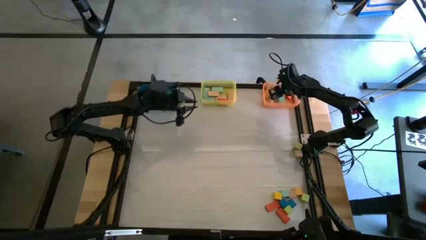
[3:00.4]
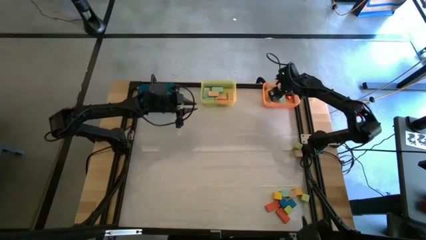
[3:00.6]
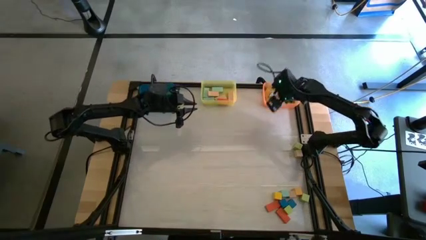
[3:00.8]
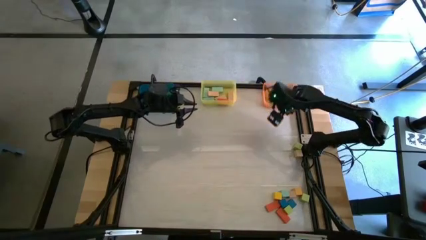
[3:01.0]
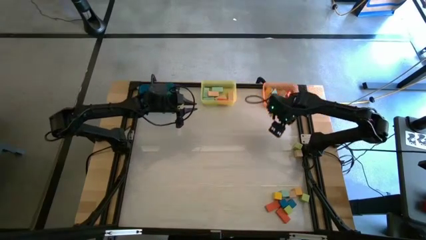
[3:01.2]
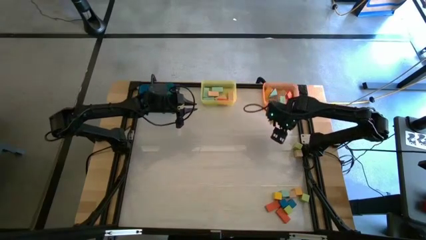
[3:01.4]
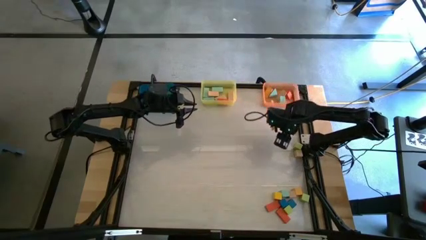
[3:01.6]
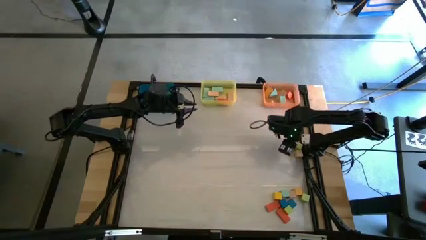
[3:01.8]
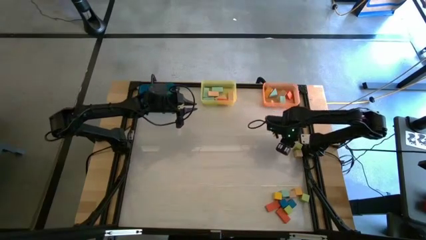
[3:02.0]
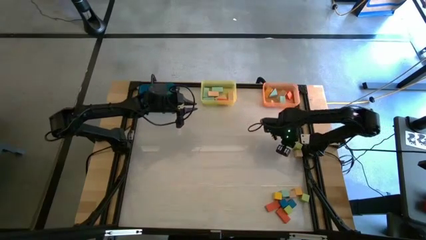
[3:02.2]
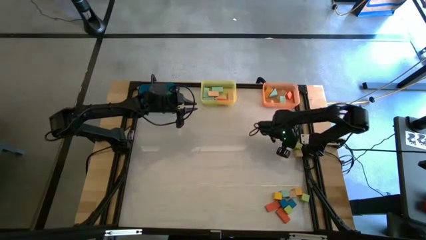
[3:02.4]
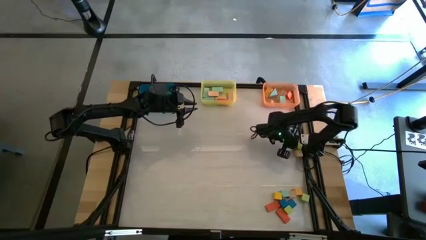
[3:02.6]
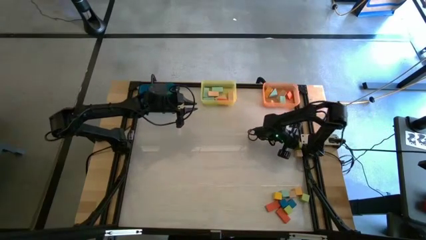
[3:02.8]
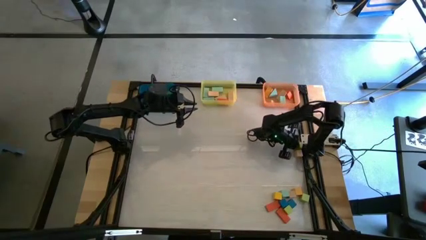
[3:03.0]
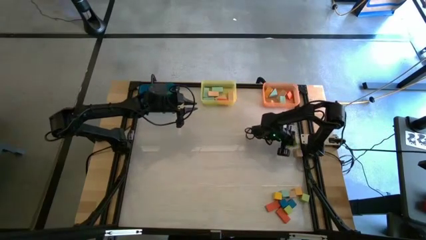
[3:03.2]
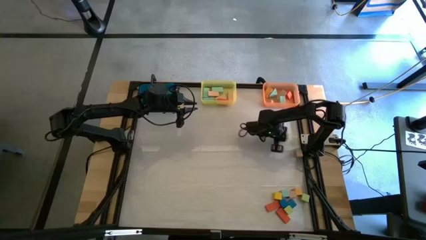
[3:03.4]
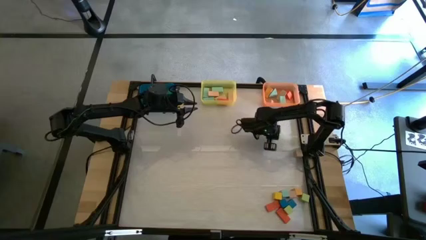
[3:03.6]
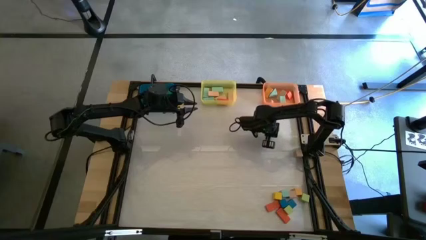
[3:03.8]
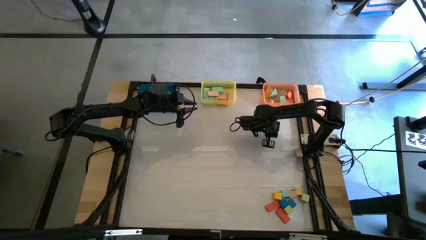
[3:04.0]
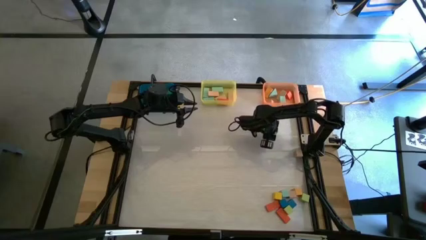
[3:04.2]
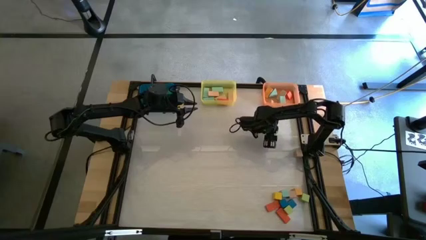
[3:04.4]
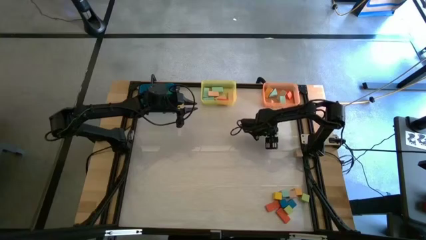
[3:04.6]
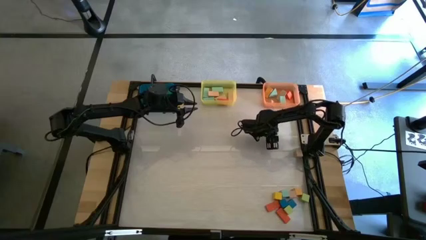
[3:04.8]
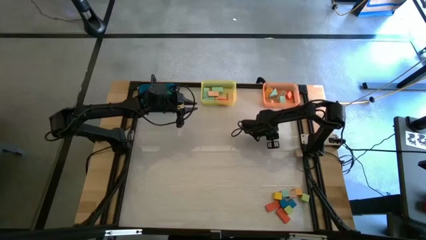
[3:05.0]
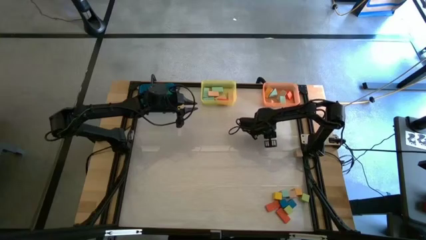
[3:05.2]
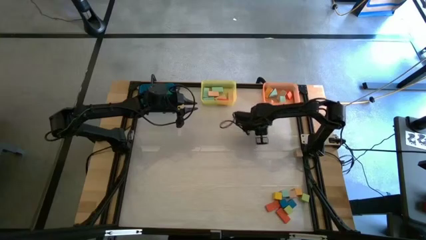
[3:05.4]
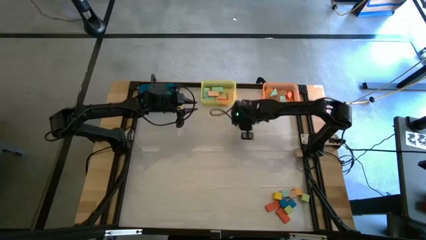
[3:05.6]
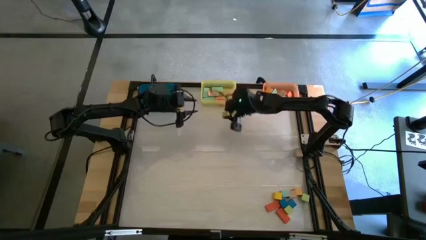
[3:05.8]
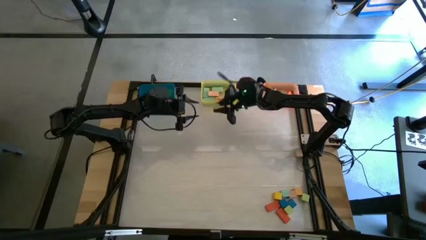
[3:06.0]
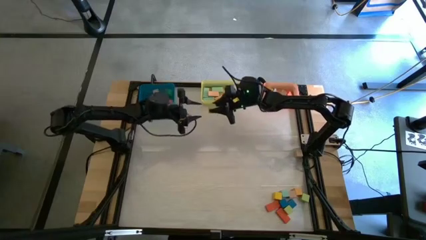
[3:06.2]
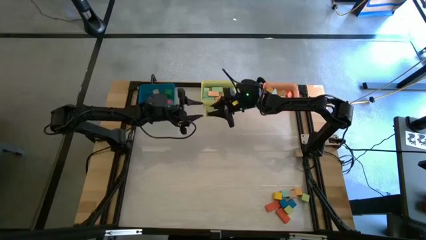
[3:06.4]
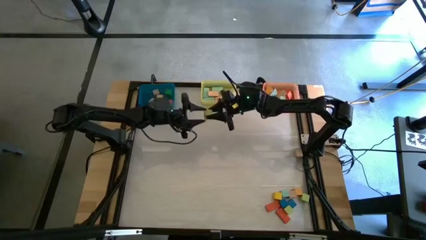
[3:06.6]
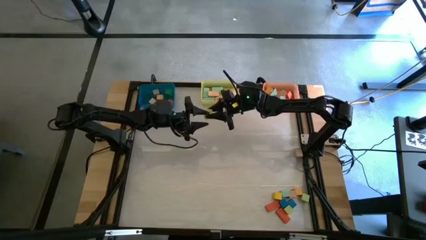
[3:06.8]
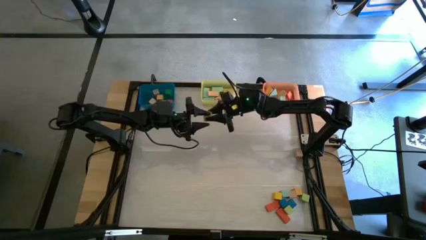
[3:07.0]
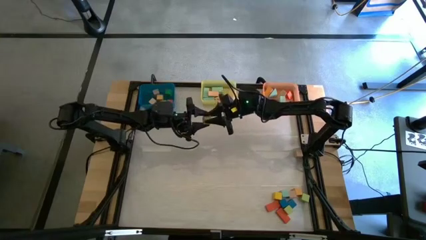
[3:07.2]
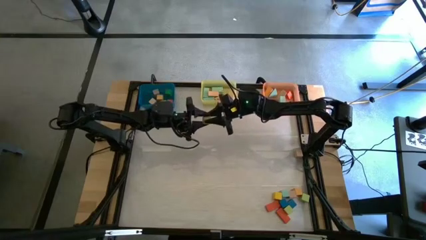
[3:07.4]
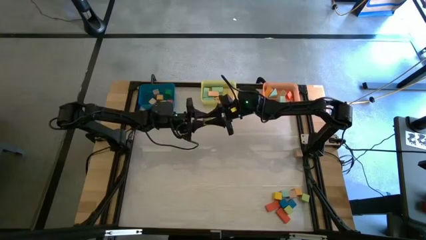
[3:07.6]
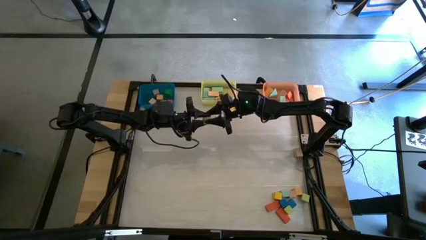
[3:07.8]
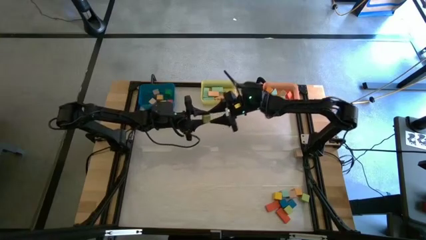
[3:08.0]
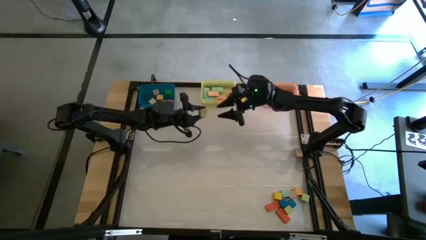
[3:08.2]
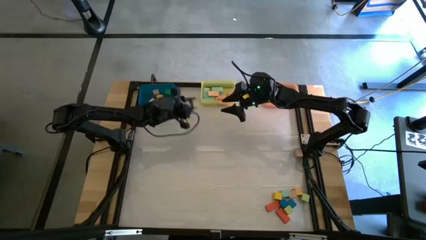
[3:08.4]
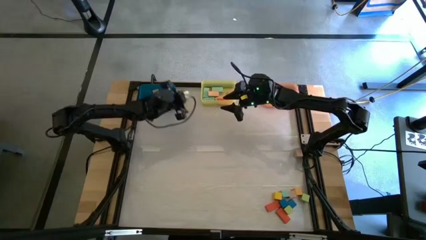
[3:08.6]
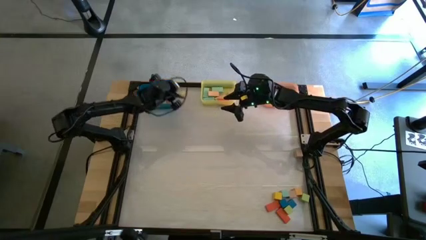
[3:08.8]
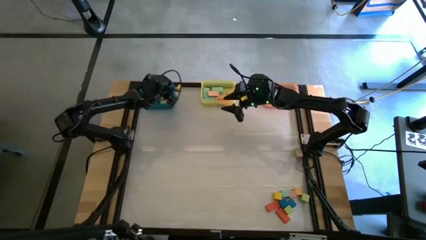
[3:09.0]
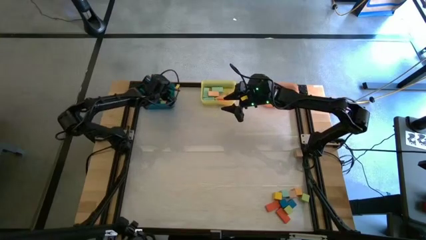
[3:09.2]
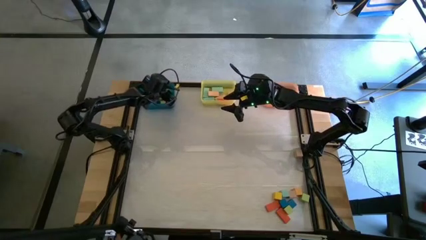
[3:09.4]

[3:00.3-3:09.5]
Task: Sort blocks by size
Put the light green square block into the blue bin

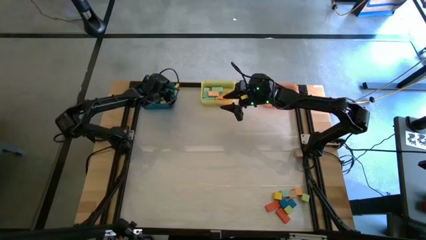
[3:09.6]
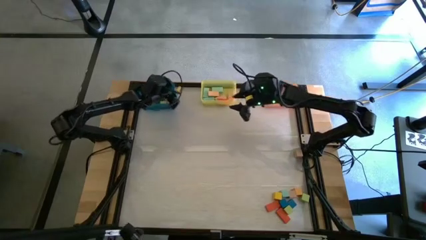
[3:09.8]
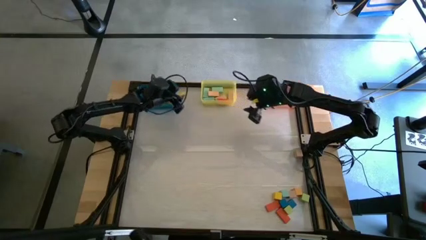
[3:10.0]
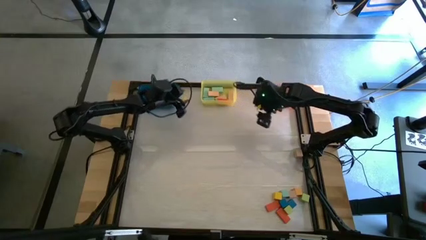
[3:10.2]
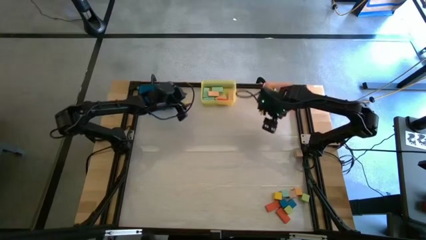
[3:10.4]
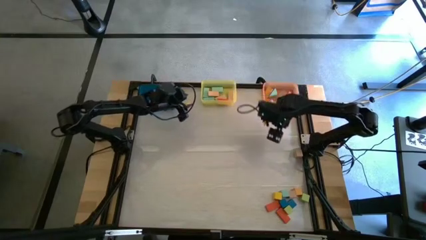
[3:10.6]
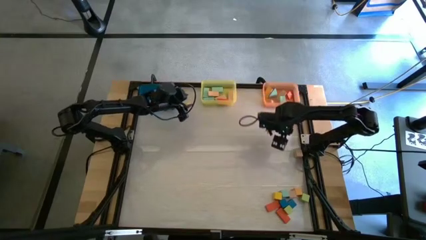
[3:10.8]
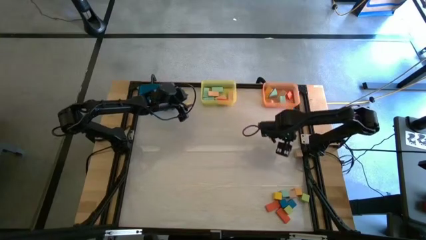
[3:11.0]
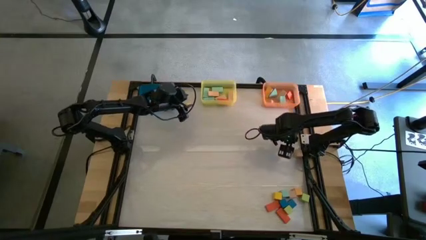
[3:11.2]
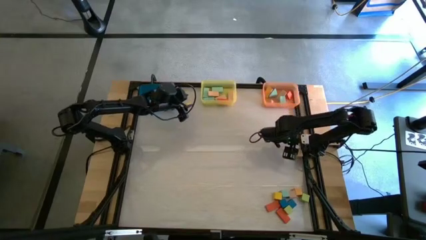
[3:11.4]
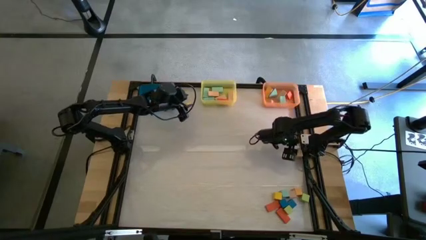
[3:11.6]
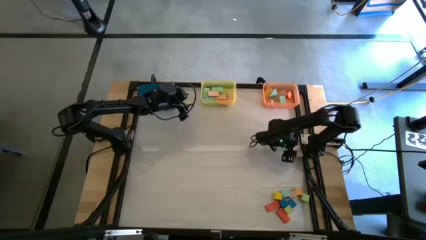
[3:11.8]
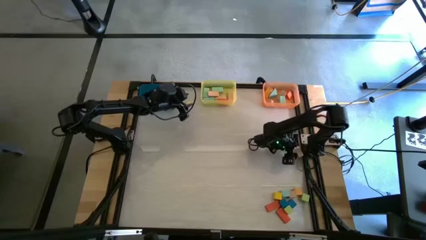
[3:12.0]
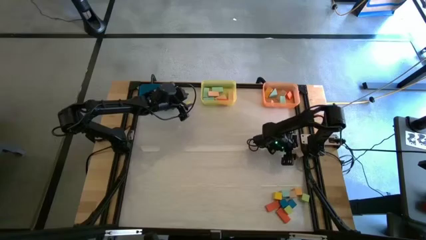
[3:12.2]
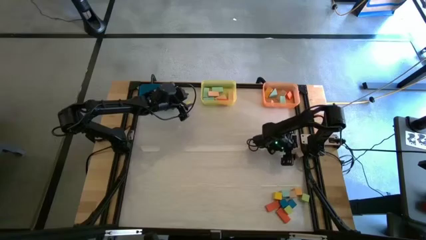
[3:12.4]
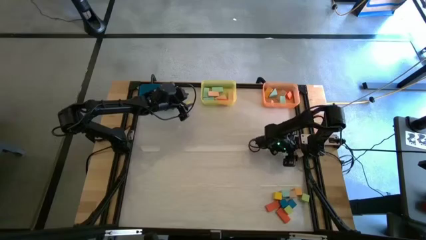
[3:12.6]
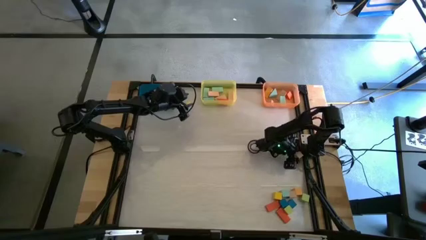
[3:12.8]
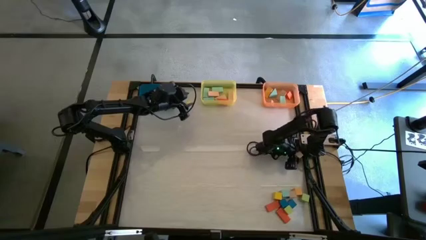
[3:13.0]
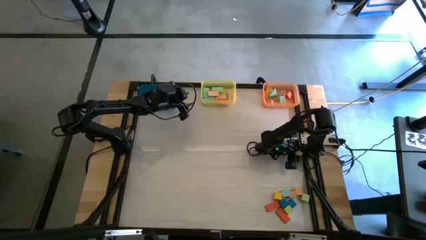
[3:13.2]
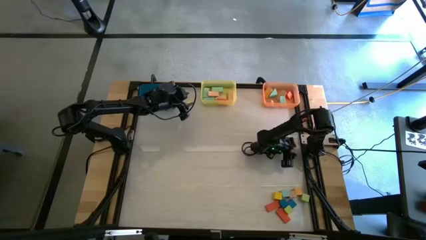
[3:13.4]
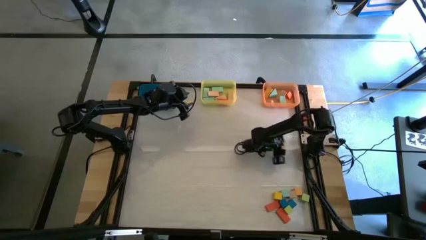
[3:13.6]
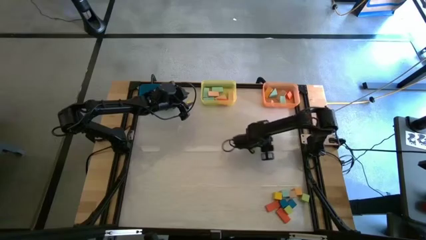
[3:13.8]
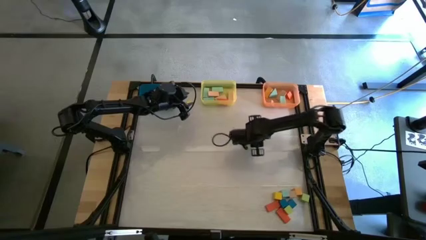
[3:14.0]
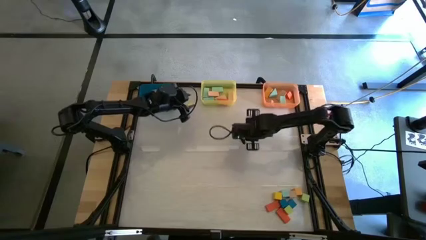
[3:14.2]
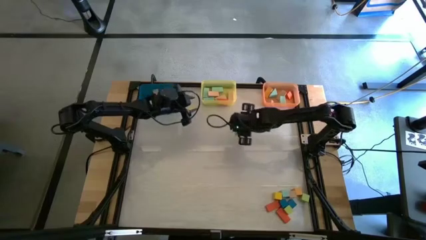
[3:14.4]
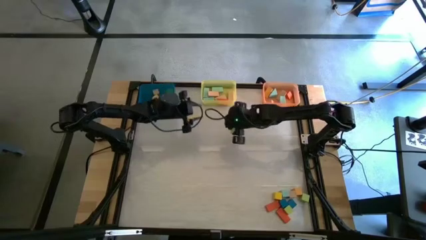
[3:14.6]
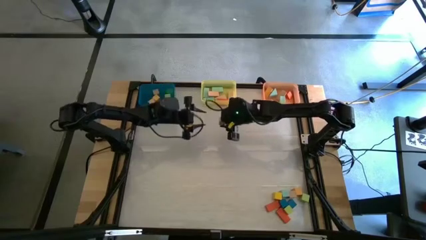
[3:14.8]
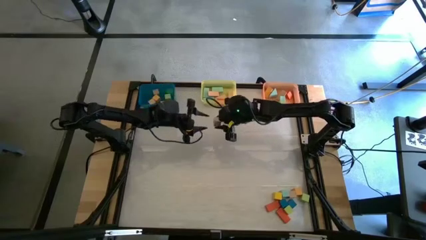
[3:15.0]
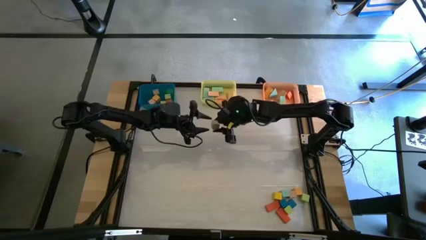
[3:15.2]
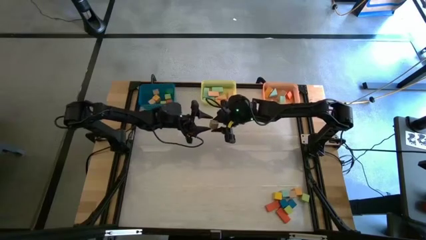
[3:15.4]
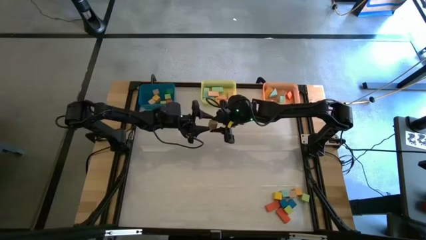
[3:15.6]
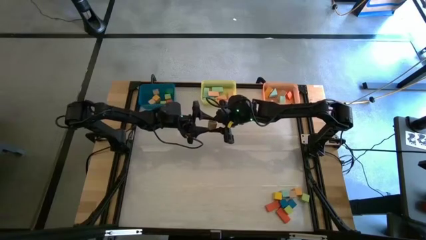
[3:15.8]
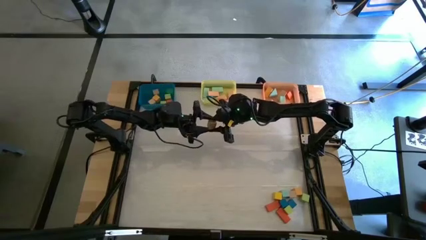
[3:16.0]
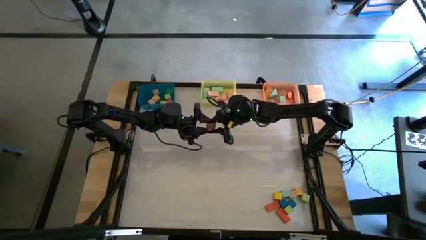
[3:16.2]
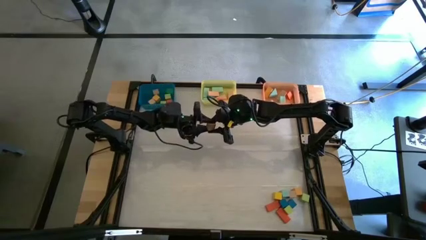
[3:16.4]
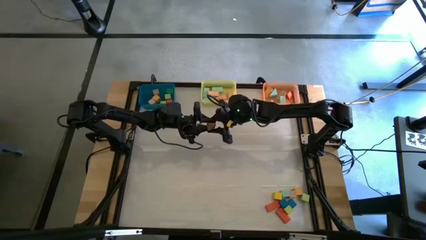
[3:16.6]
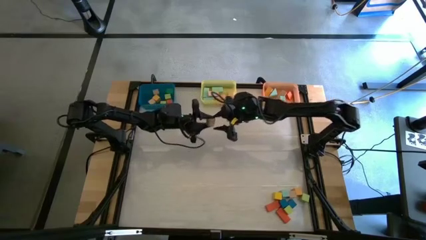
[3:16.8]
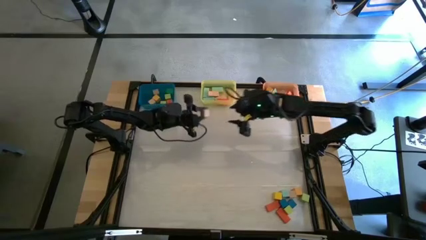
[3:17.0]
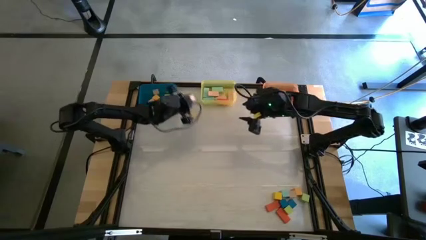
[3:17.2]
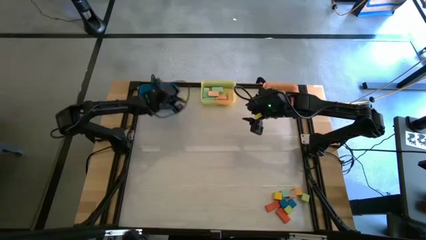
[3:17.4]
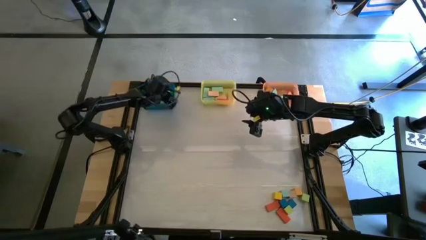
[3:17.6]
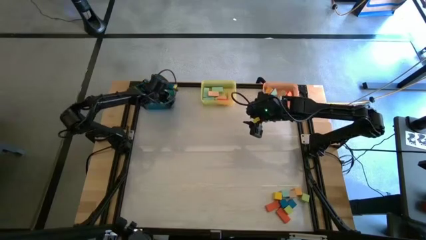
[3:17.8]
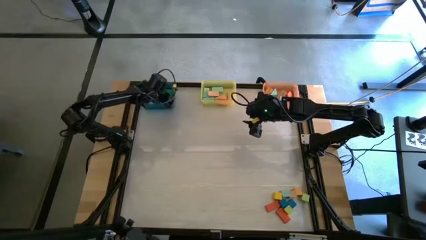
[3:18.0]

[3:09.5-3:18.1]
Put the brown square block into the blue bin
